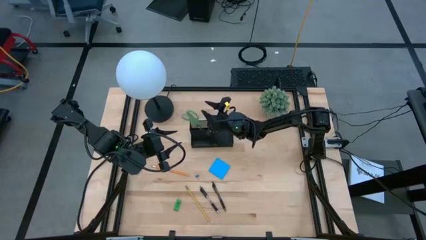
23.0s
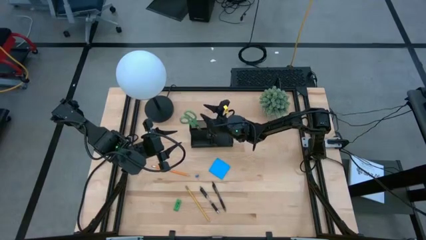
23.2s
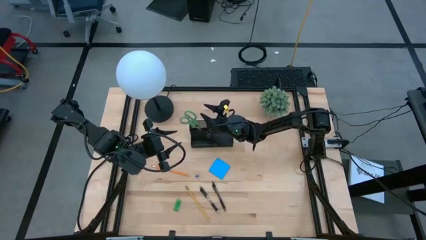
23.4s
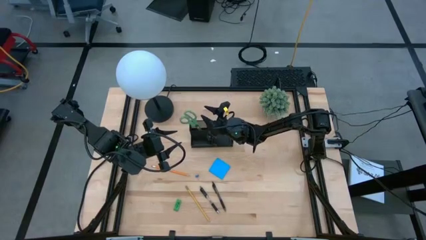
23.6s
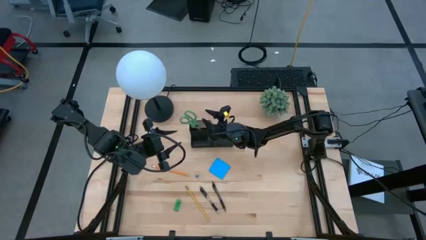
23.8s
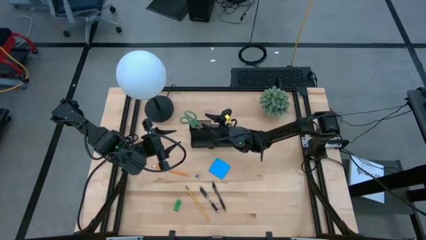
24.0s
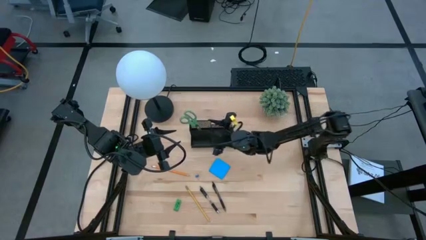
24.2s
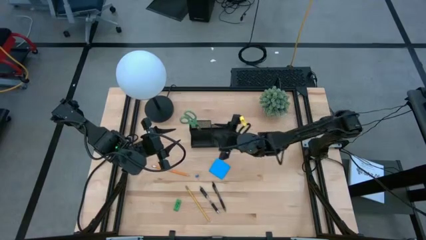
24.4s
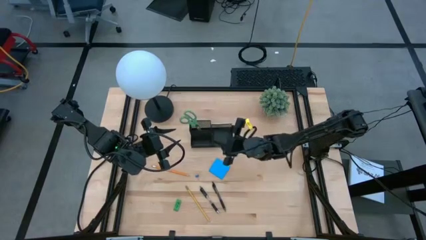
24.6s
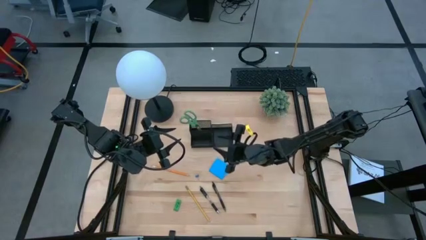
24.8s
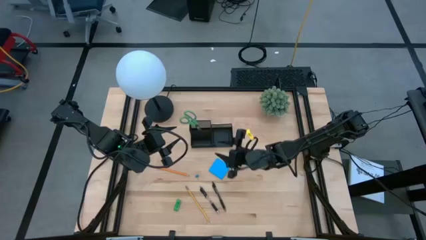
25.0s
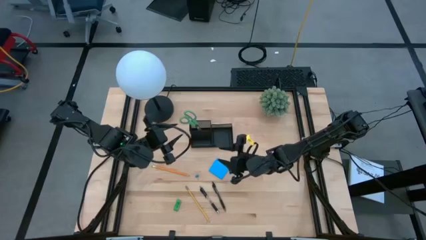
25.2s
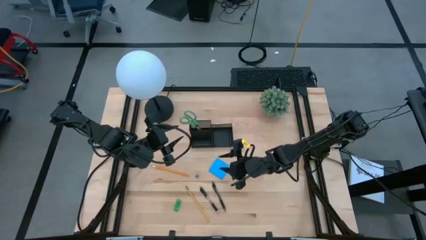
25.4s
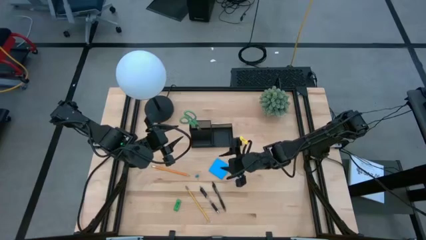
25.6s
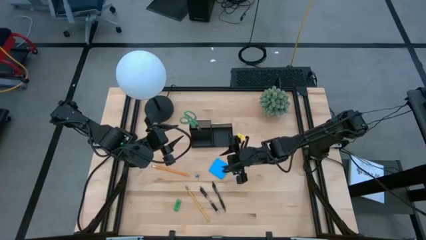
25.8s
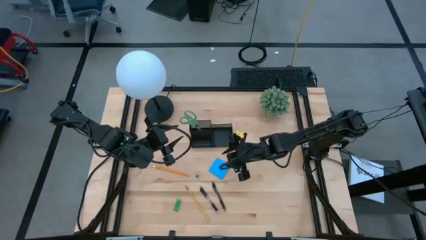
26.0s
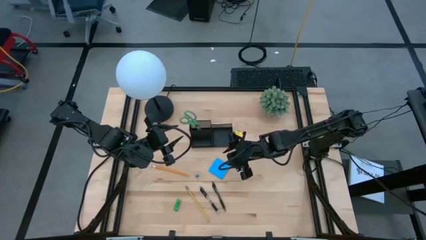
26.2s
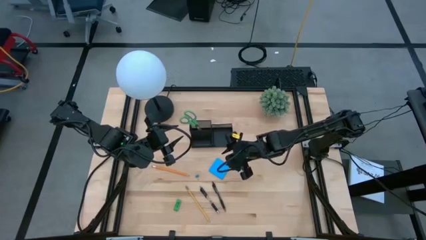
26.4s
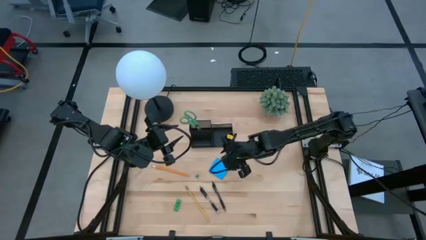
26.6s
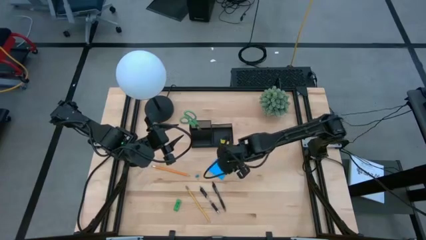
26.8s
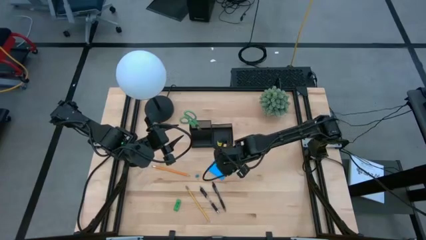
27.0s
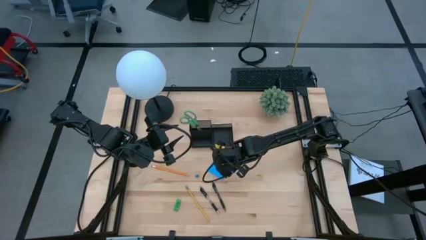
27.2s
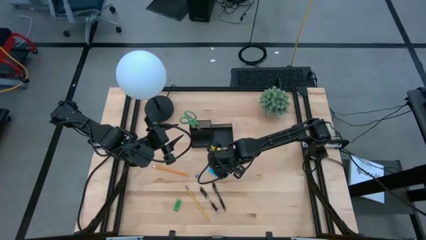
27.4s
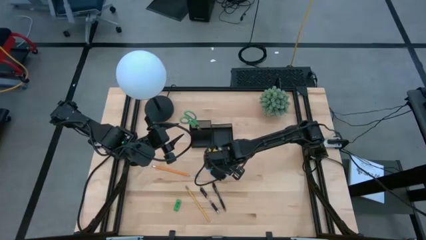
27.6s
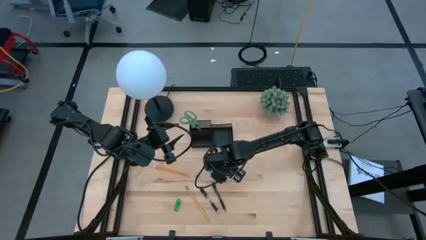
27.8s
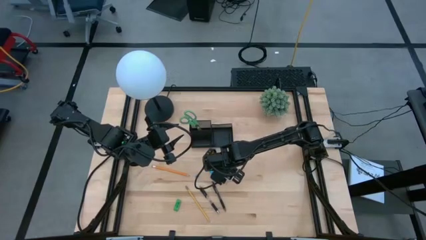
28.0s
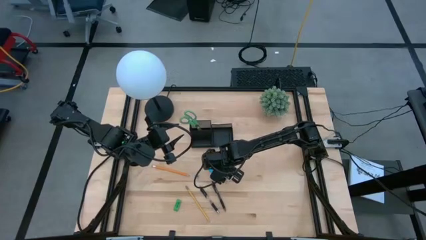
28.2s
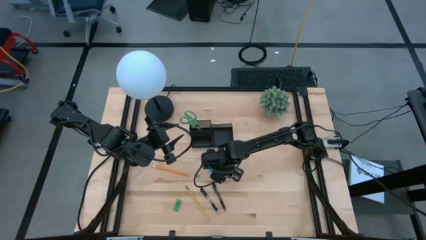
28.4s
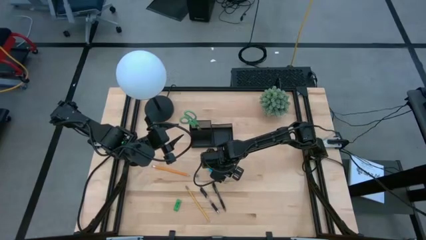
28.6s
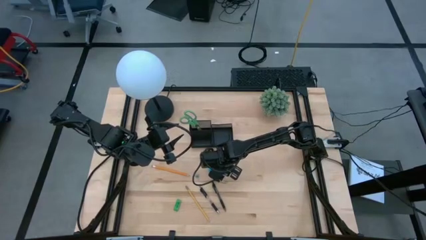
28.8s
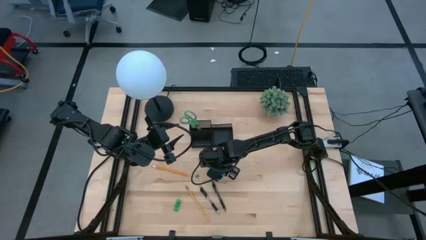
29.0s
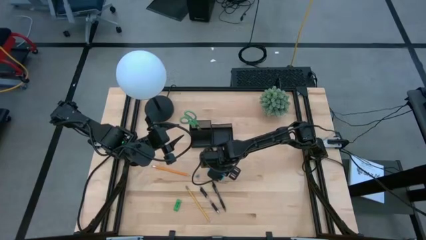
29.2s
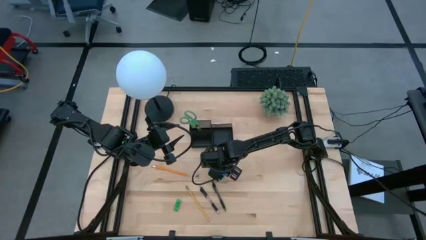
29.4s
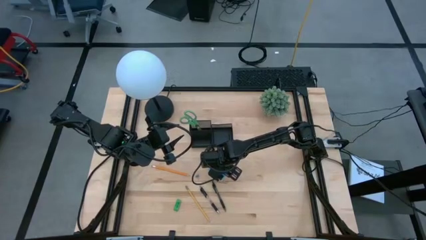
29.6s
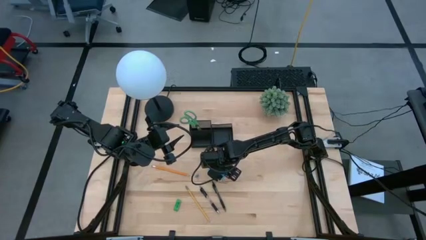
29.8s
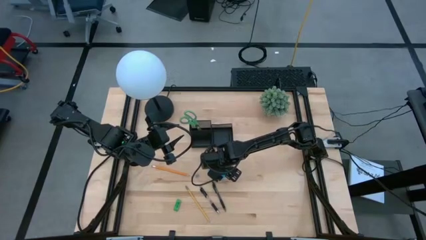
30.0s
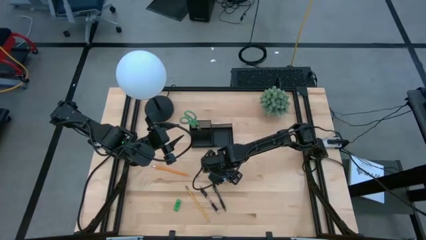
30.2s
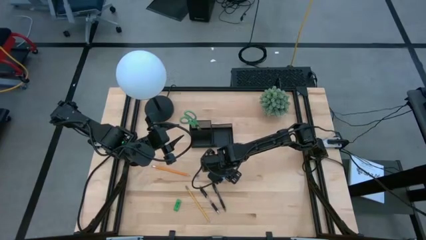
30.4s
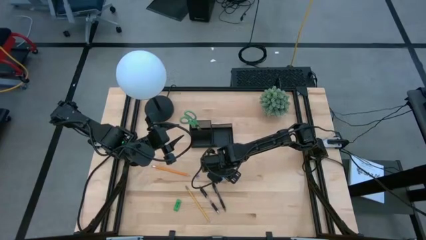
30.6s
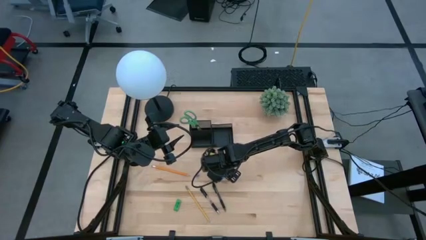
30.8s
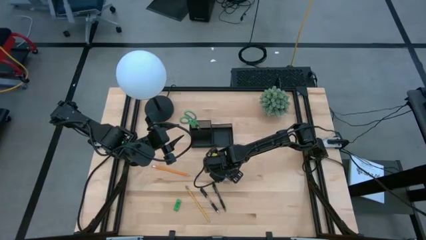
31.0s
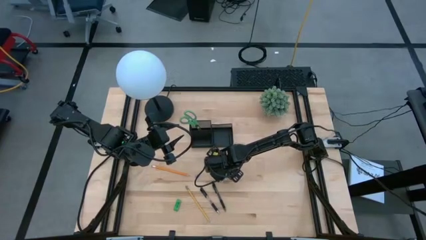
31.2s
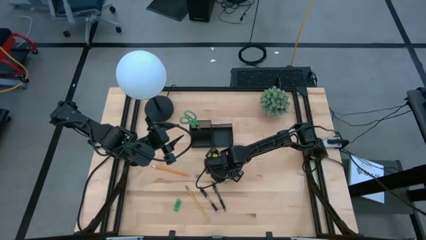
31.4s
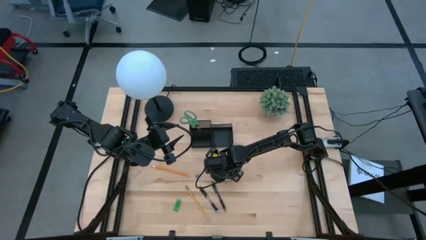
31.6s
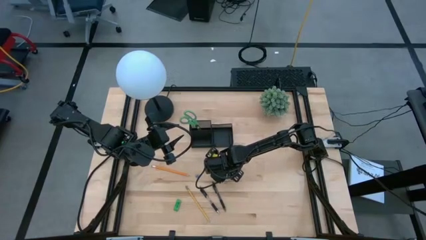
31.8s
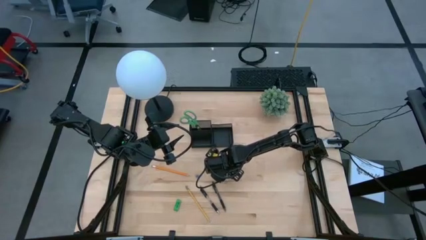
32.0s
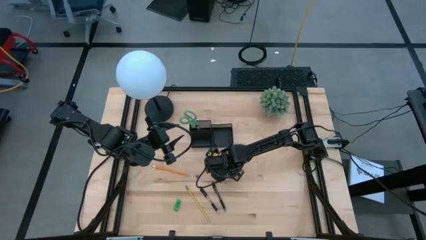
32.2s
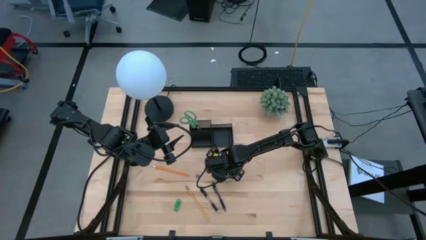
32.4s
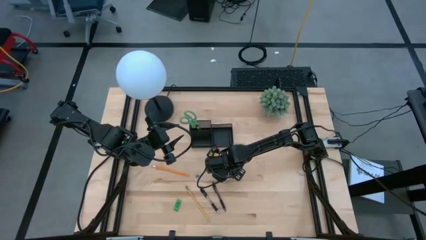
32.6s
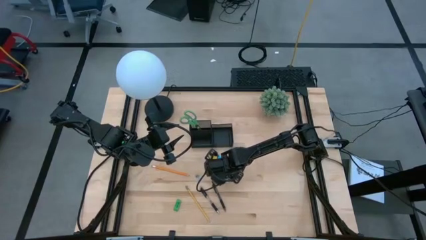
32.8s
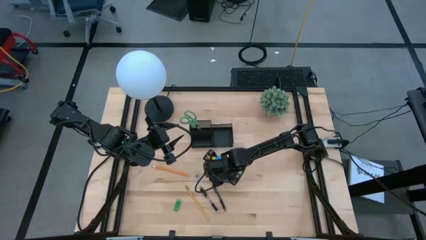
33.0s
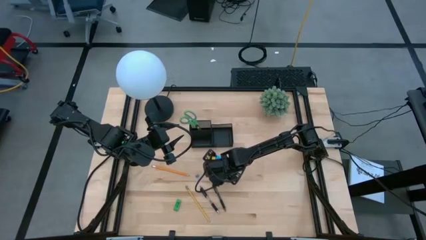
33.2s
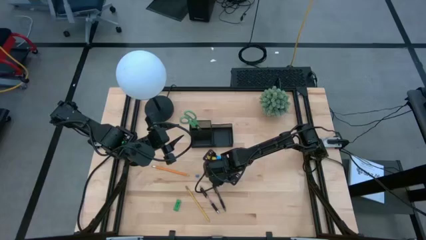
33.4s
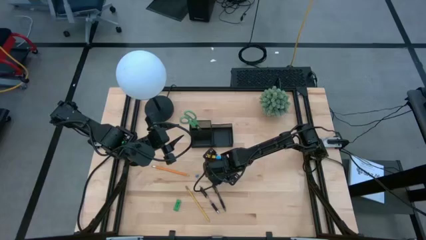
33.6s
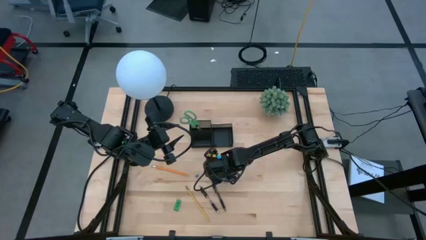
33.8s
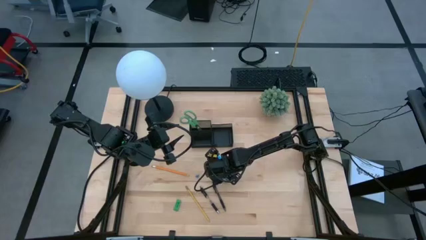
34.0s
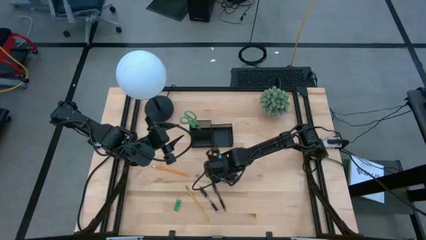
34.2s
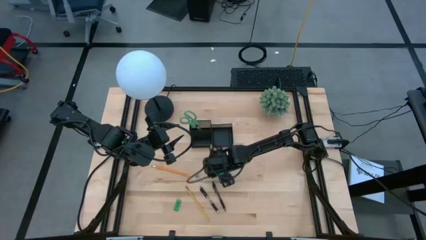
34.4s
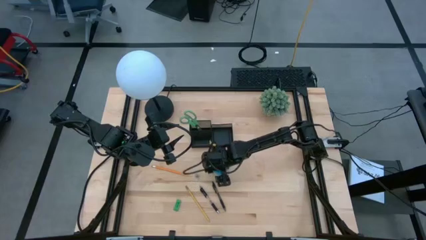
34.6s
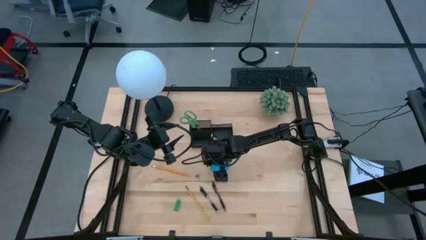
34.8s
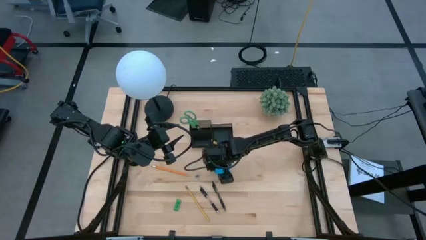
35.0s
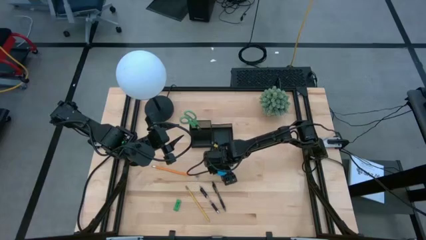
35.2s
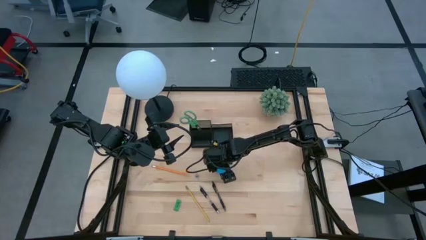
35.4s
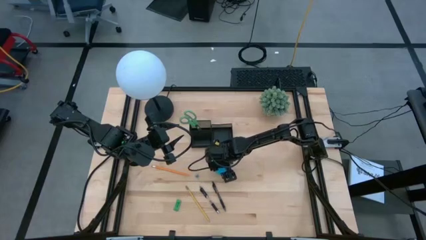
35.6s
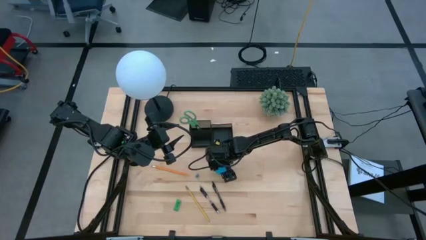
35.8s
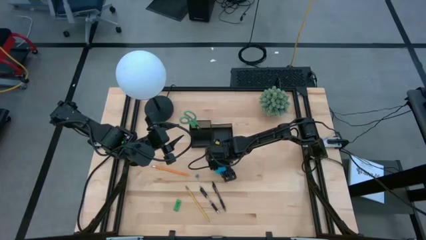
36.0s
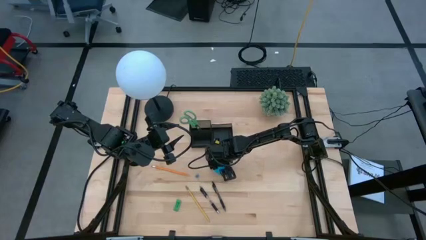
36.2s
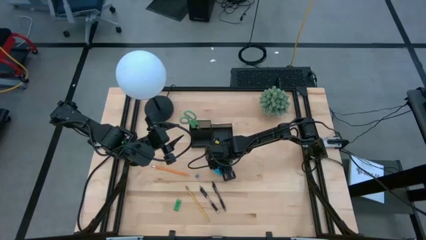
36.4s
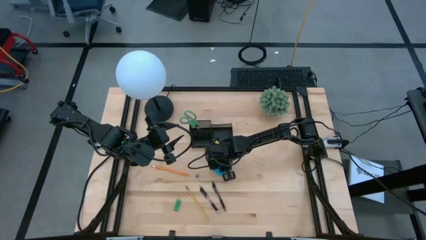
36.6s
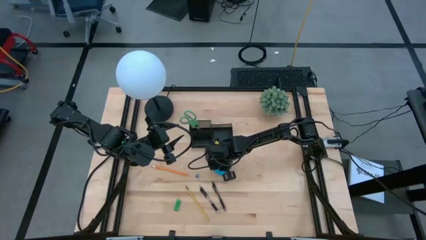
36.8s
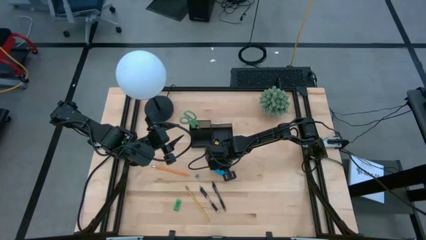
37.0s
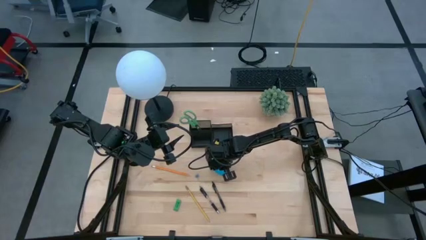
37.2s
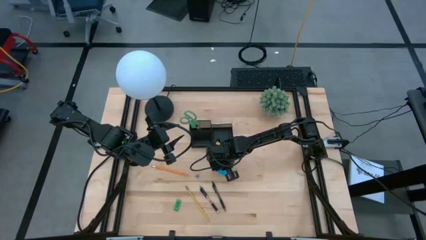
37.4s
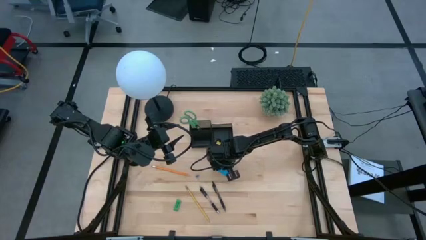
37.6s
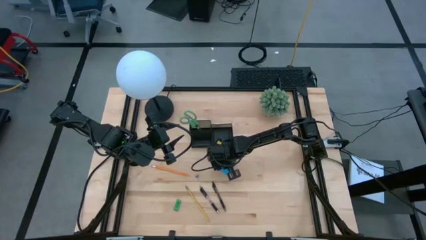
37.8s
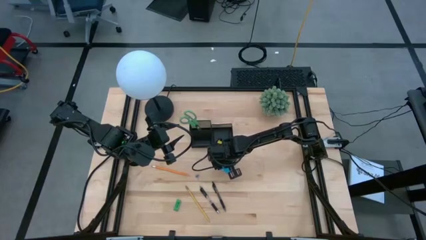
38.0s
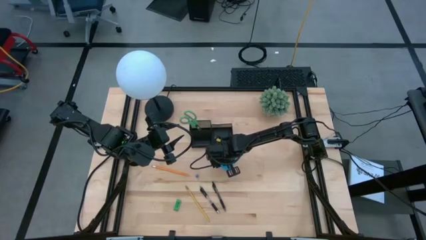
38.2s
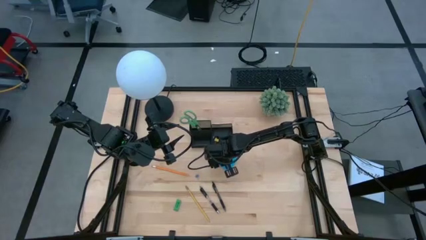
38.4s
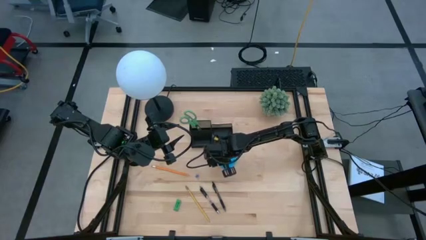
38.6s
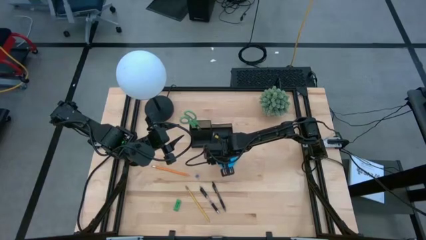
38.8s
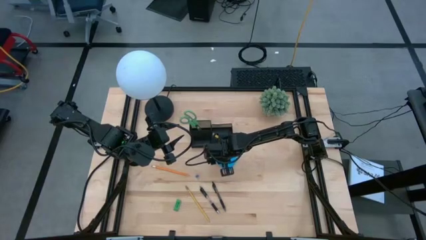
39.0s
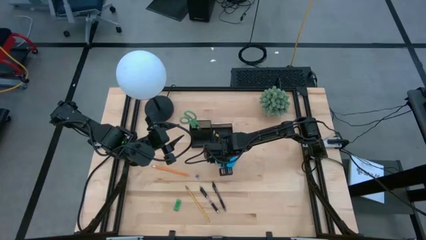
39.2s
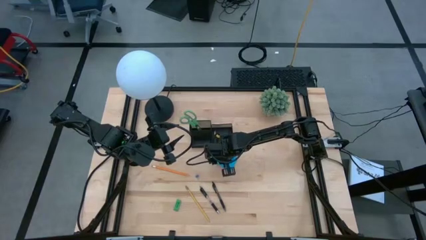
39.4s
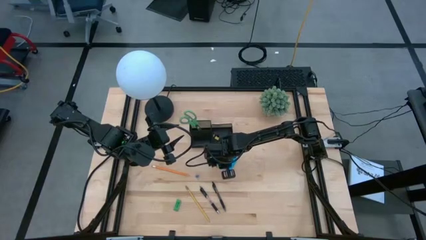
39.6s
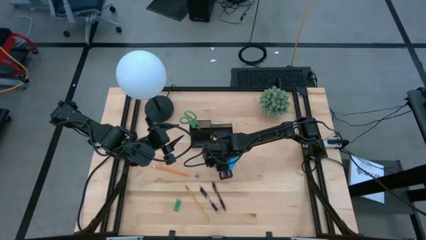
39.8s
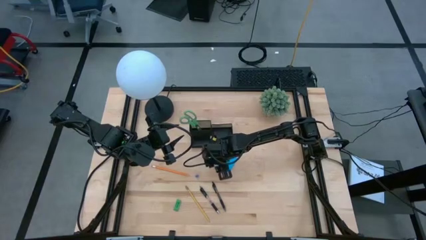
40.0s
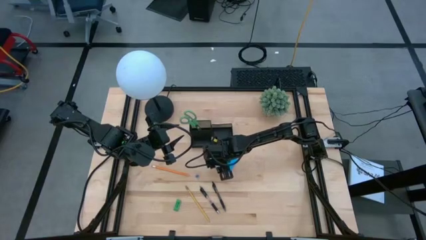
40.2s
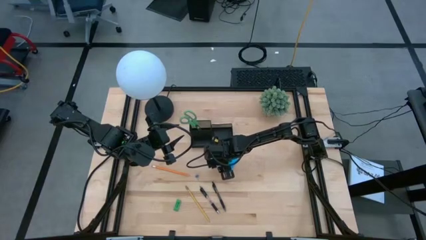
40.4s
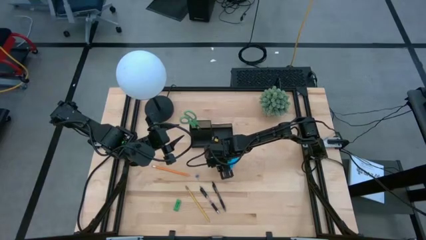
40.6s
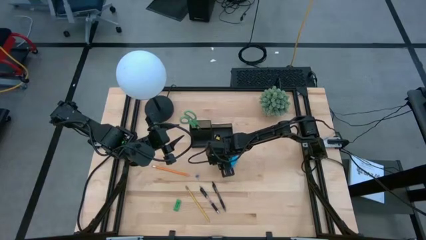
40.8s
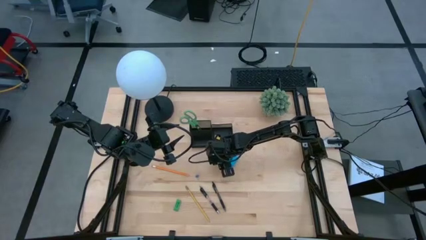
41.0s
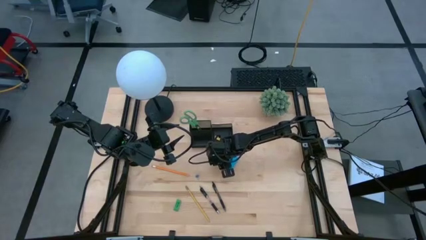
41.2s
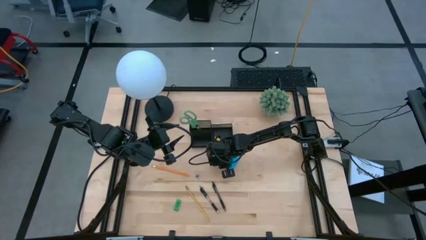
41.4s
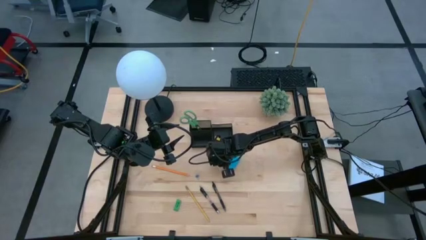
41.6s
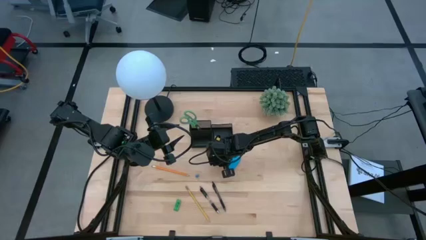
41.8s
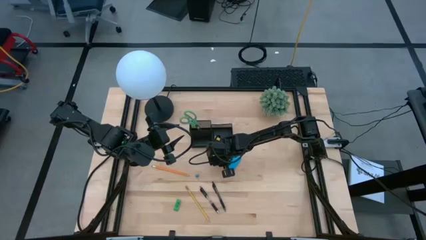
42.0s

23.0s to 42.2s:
Task: Pick and place office supplies into organizer
Put the blue sticky note into the black desk organizer
